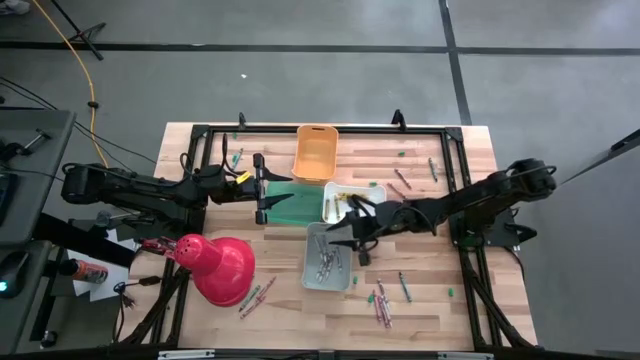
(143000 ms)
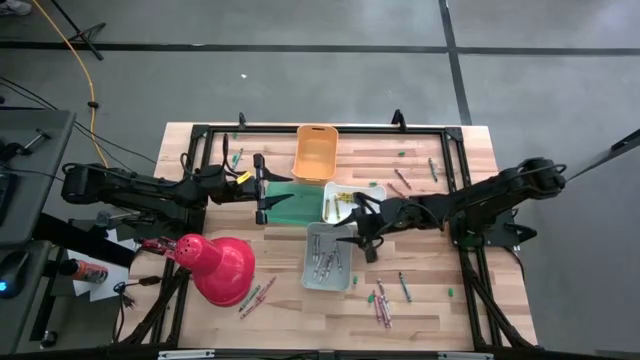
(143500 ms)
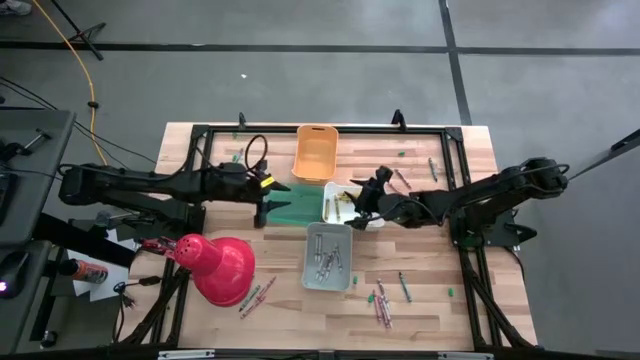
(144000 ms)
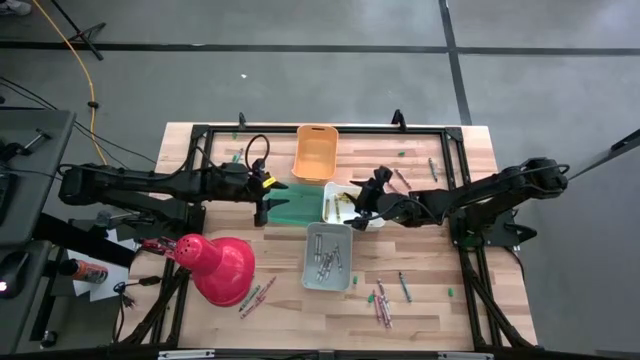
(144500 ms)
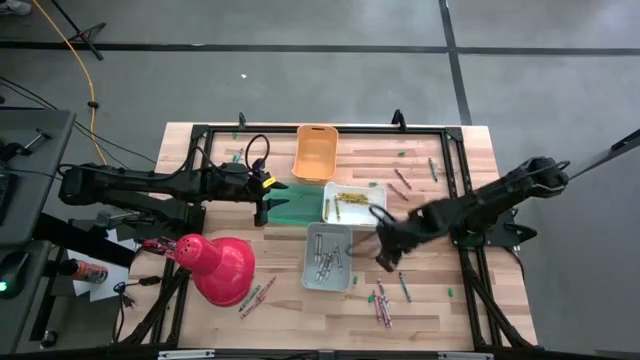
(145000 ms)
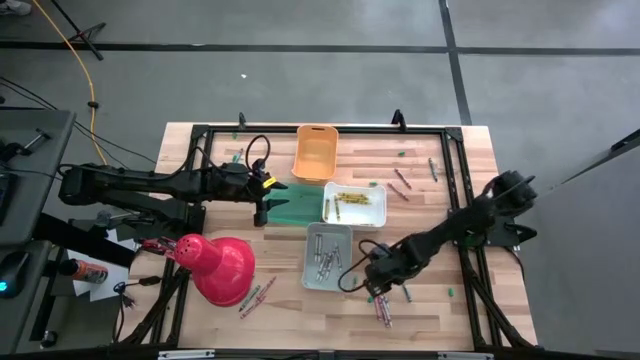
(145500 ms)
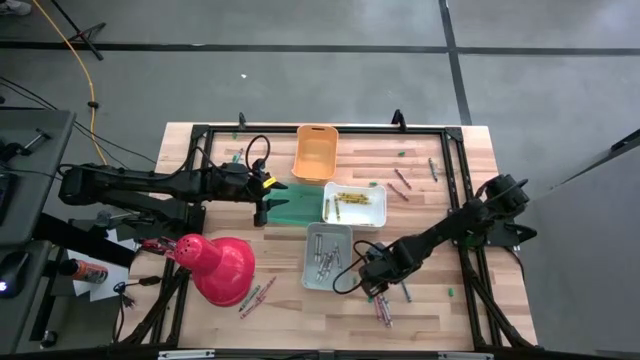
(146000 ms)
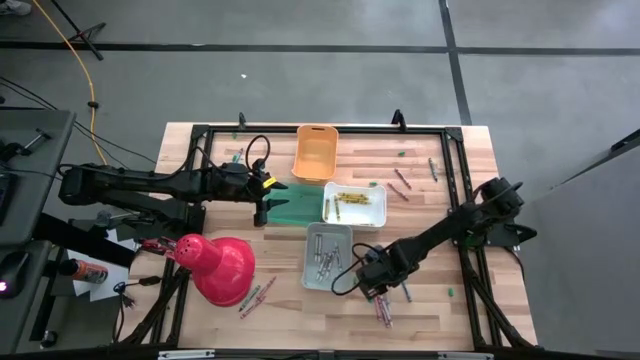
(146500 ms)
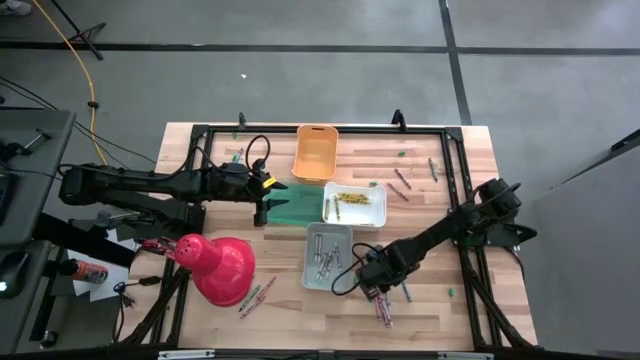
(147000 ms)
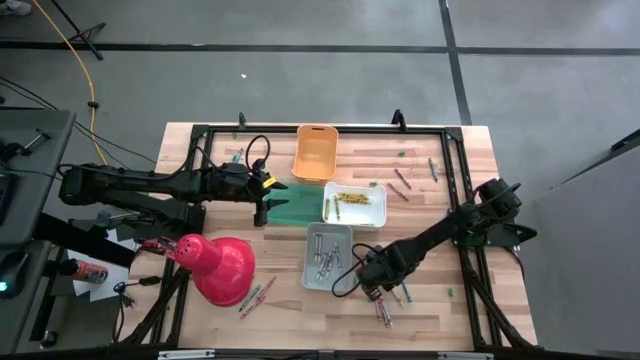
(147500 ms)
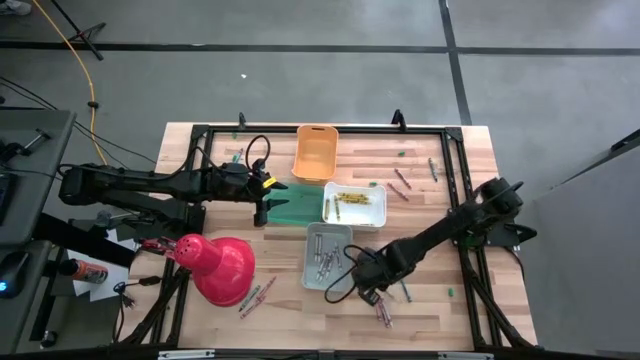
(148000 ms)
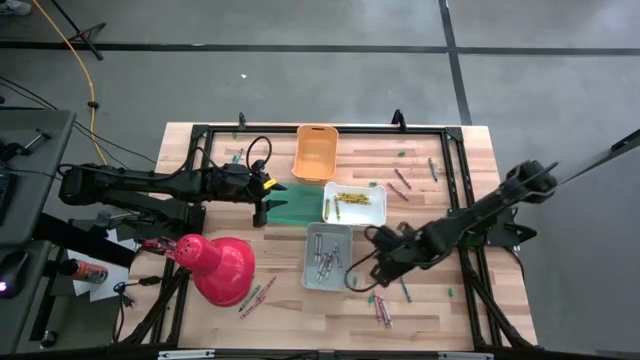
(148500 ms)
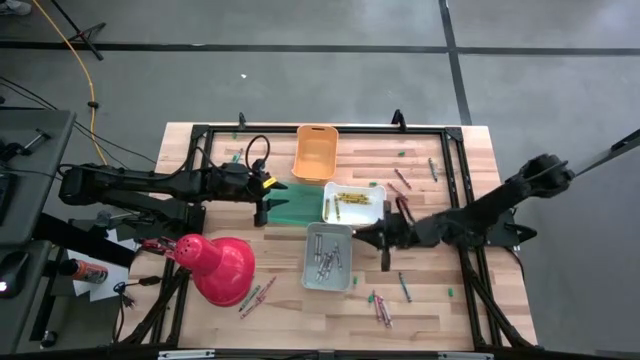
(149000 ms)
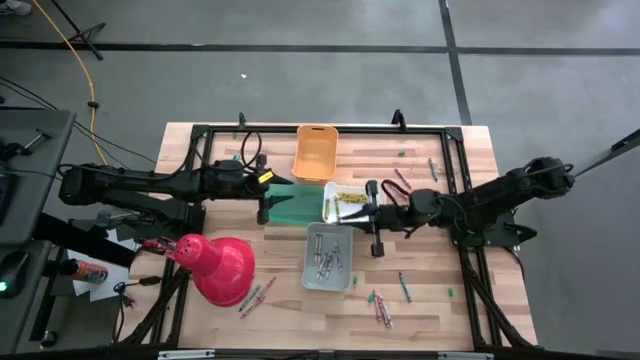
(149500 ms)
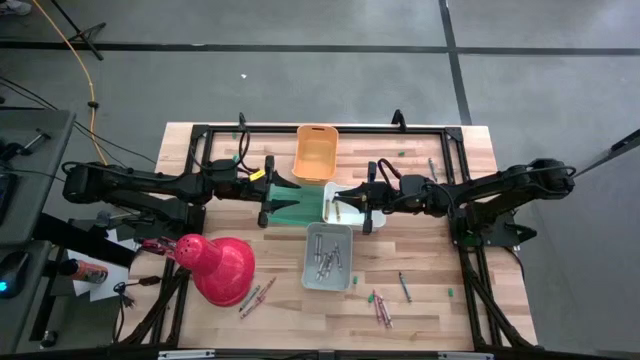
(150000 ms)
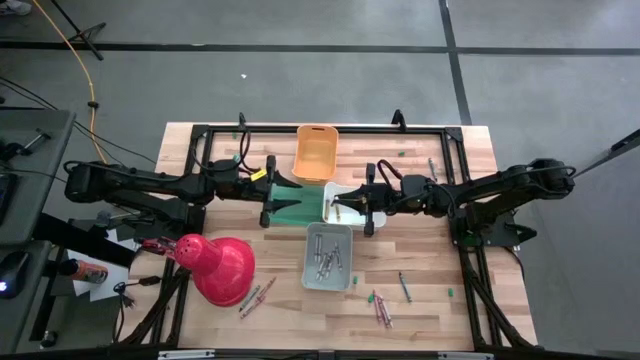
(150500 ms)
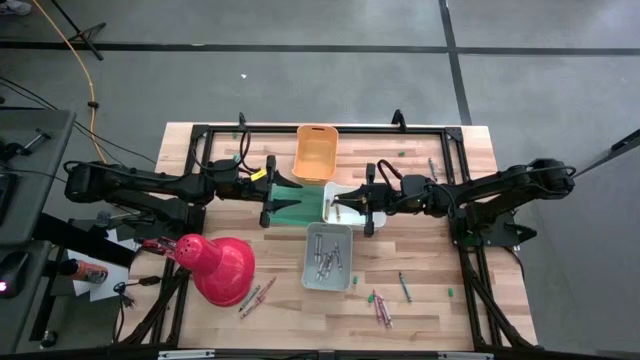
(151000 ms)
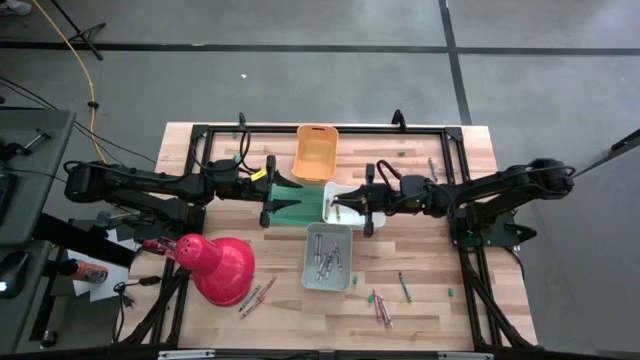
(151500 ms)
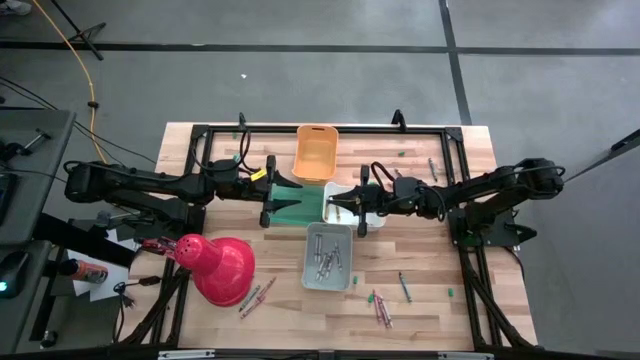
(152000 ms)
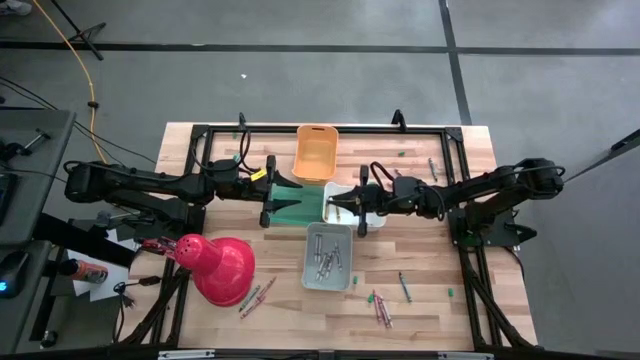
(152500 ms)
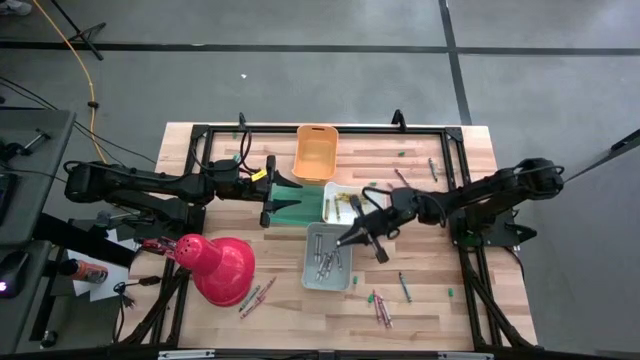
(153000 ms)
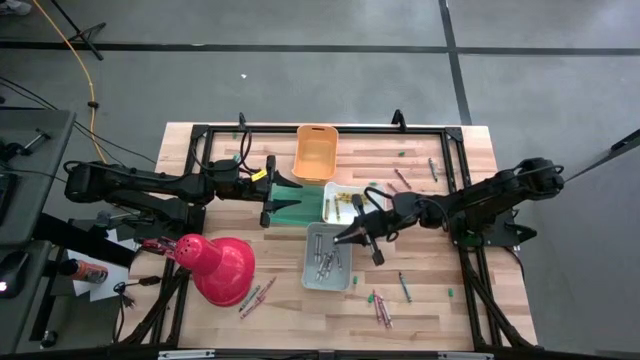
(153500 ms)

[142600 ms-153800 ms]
Task: Sort crayons
Put the white crayon into the gray bin

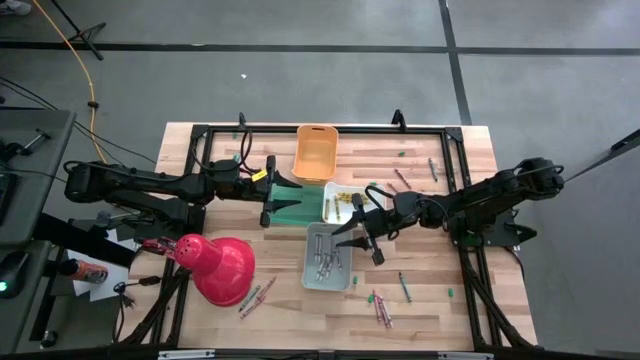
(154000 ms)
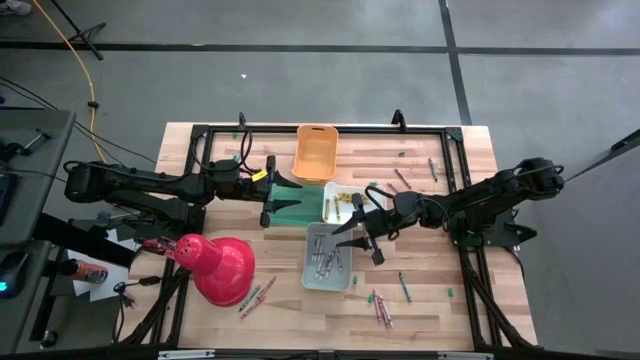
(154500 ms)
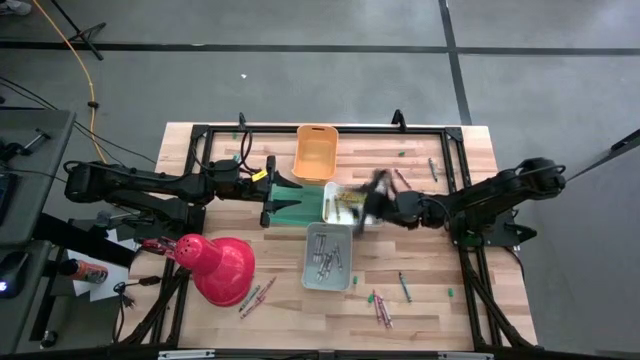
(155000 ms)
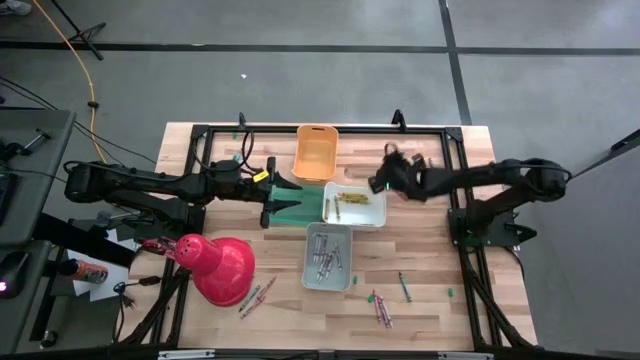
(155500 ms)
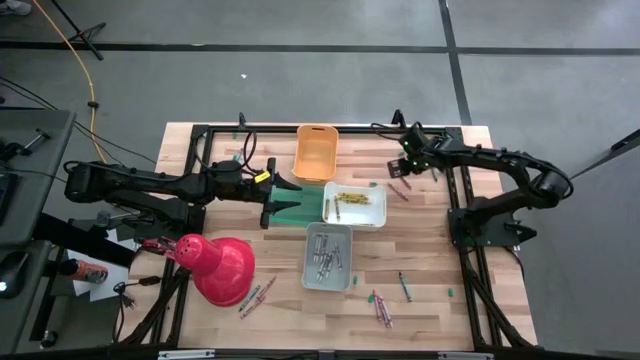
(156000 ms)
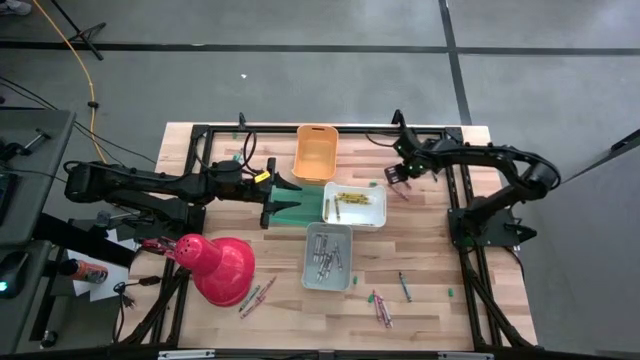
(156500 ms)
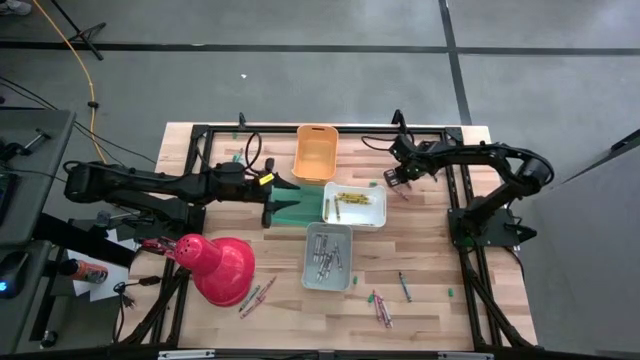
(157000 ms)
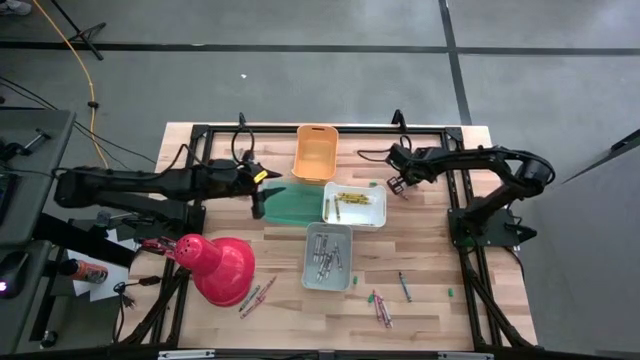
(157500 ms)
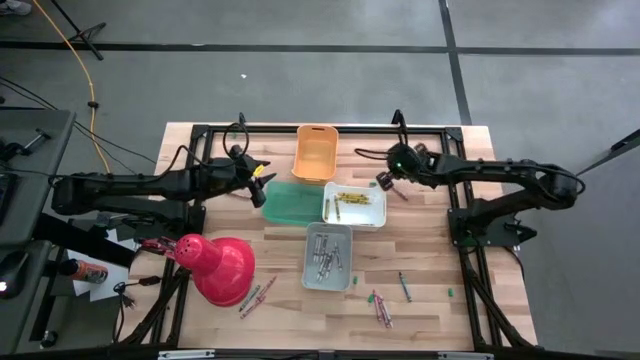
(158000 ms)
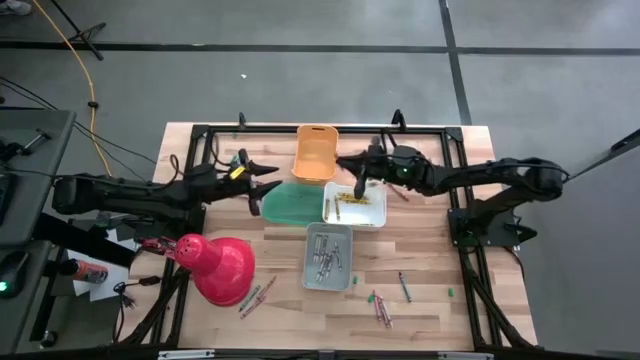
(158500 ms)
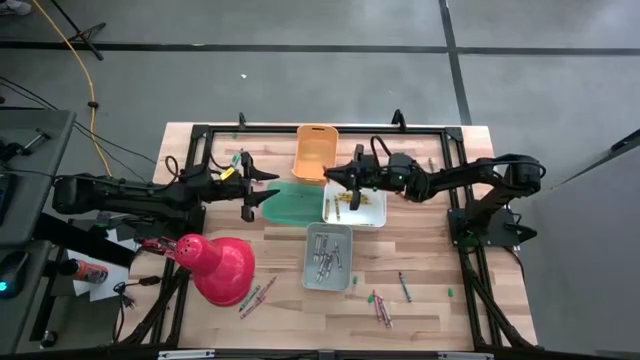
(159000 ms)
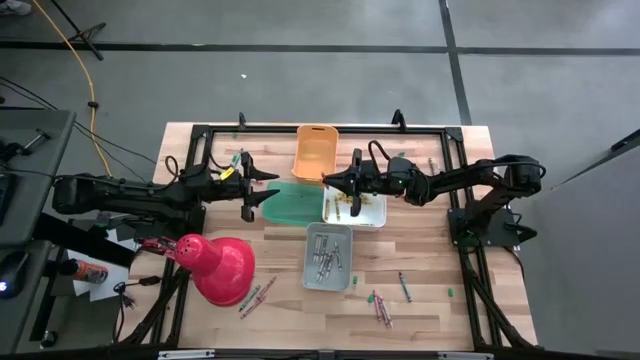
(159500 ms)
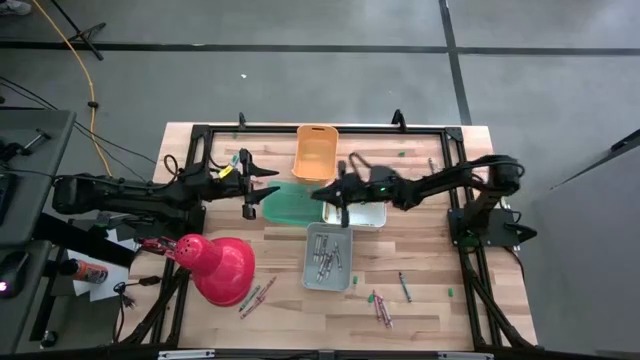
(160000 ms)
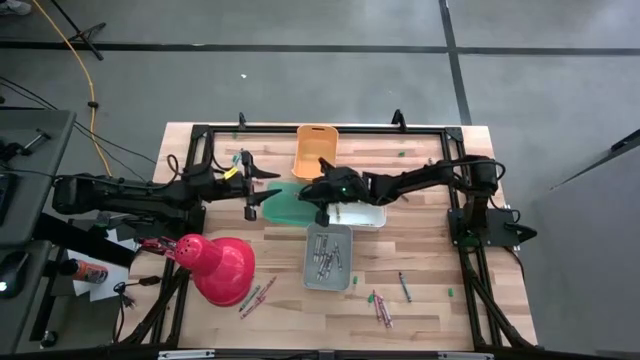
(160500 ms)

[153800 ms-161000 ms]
Put the pink crayon into the blue bin

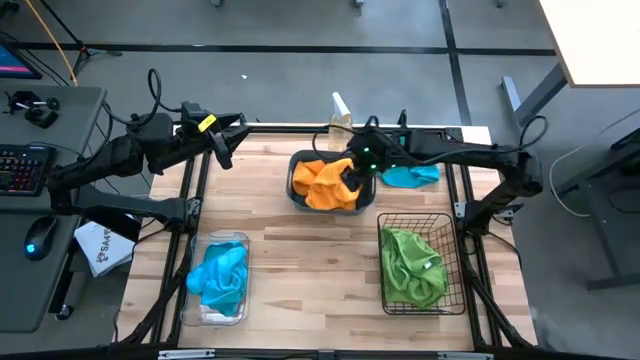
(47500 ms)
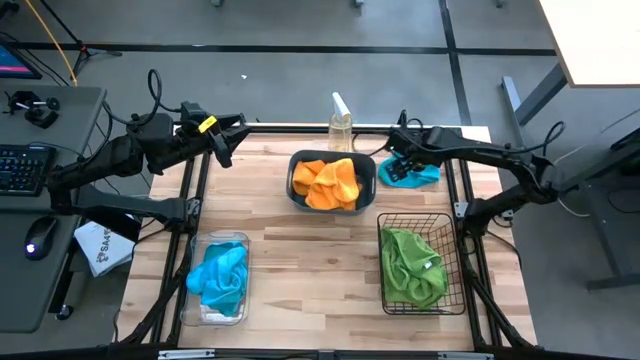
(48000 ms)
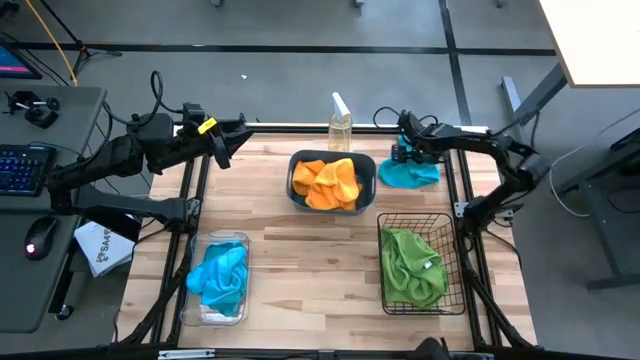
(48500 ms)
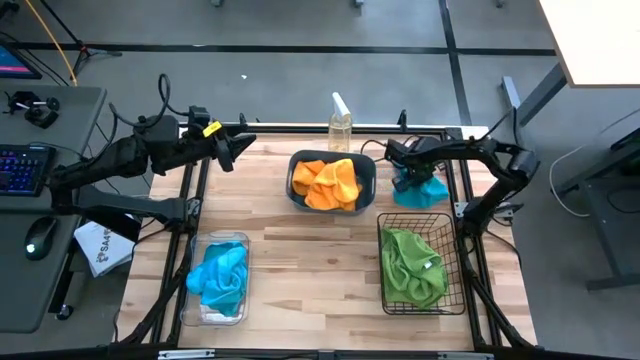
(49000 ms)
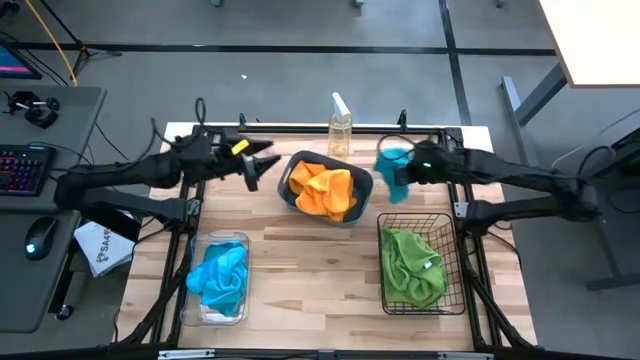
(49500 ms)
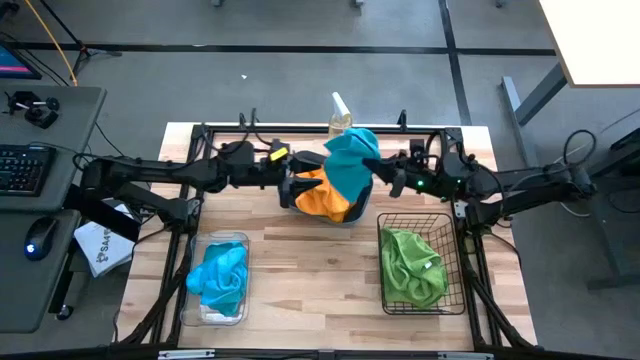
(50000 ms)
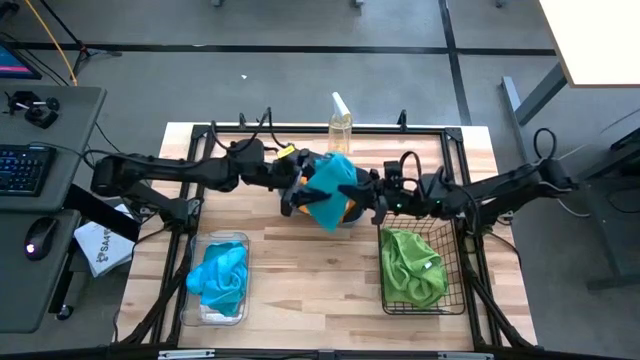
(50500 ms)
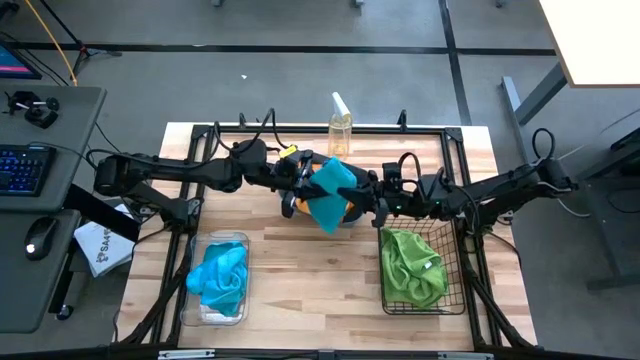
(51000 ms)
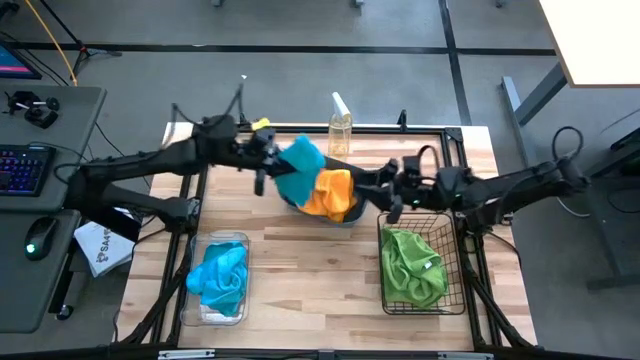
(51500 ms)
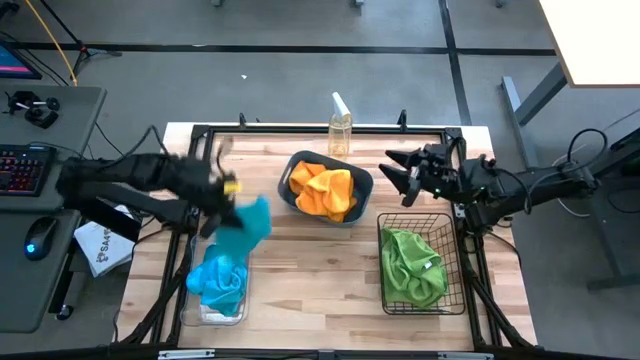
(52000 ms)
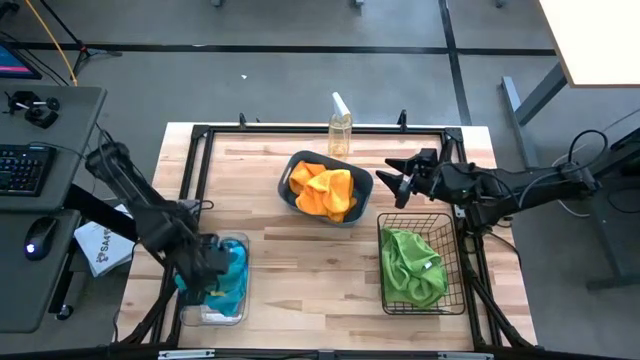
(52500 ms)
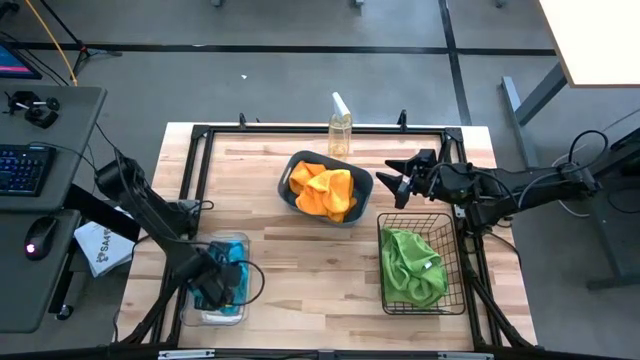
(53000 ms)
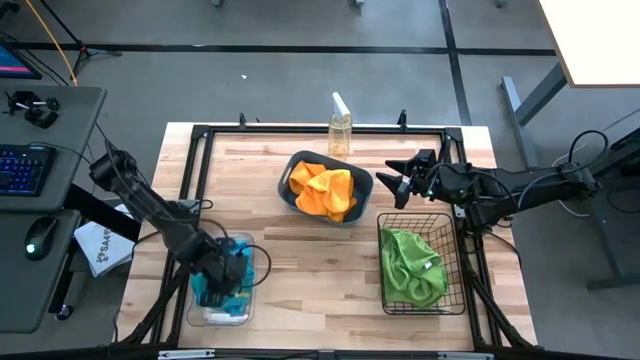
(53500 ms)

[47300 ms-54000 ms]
Task: Sort microfiber towel by color & place in baskets
Put the blue towel into the transparent bin
